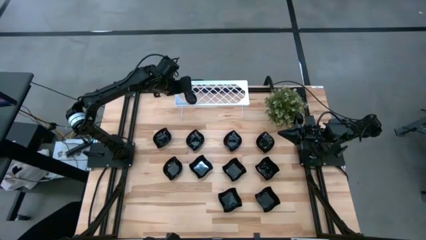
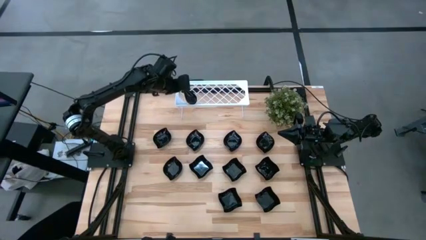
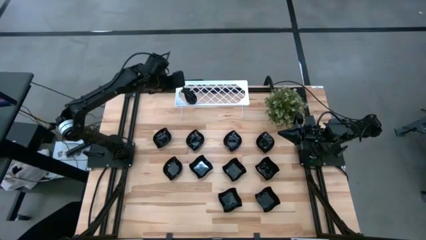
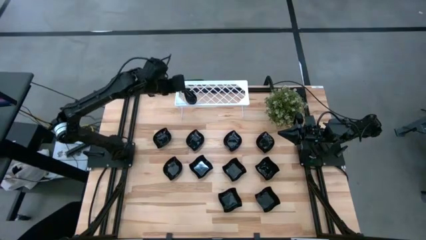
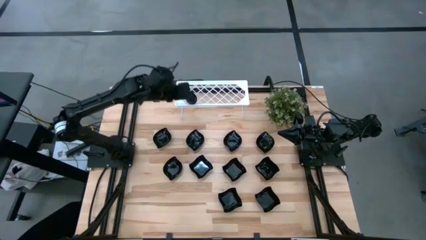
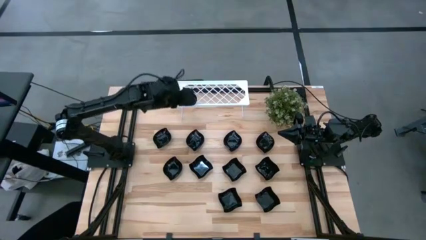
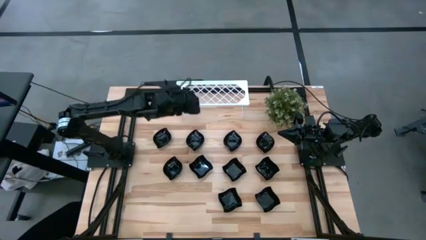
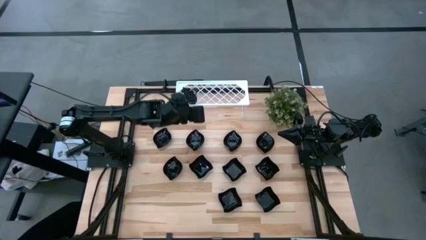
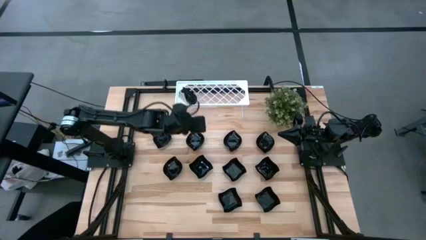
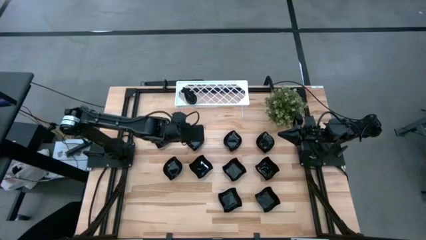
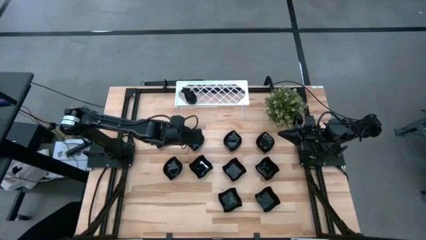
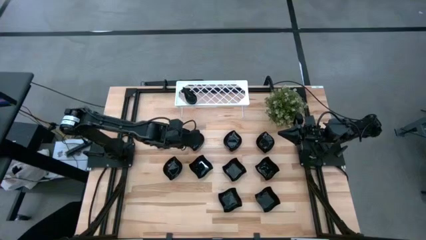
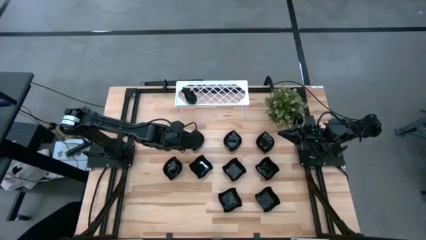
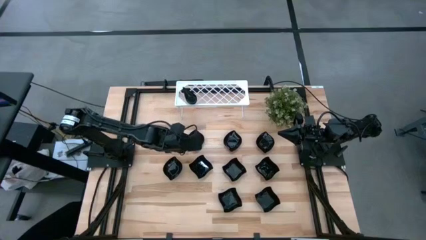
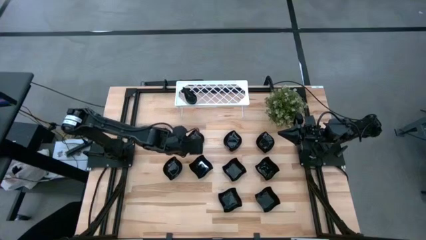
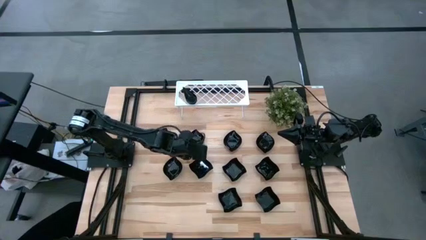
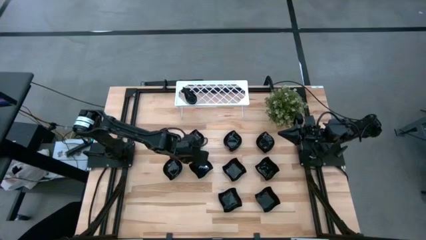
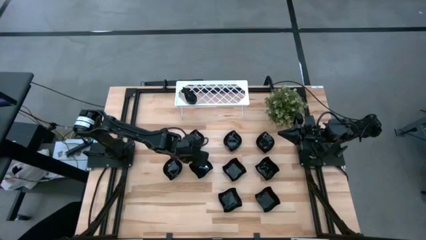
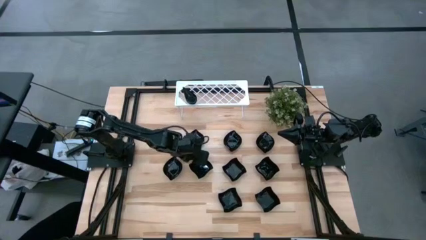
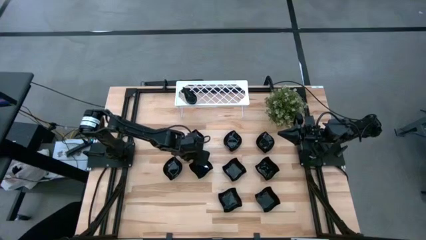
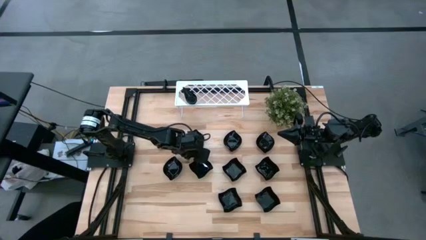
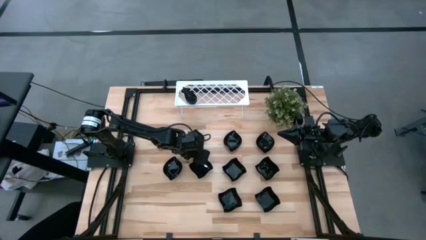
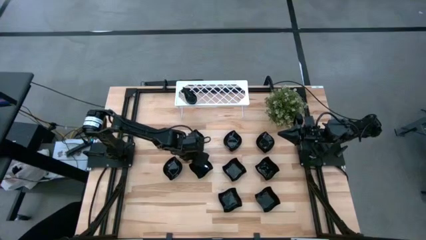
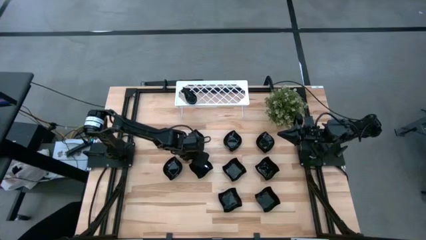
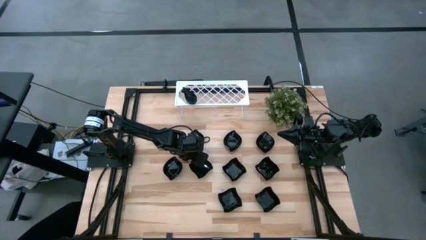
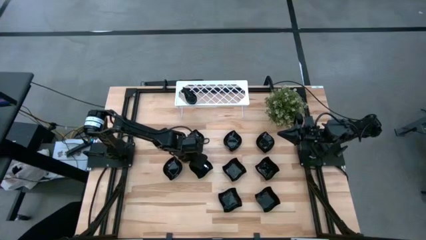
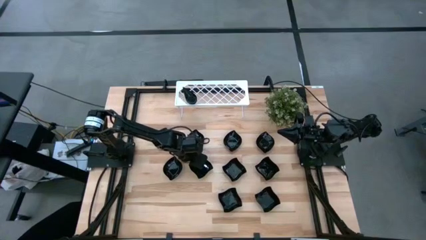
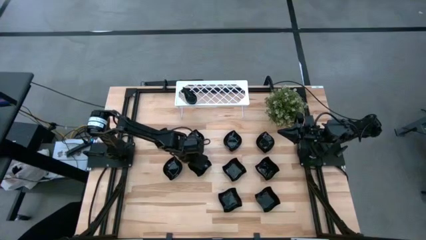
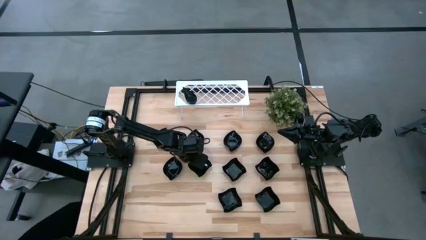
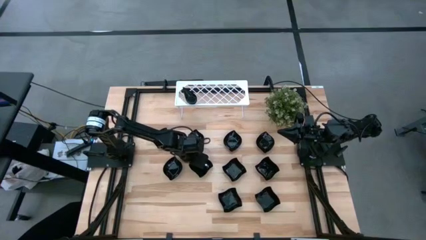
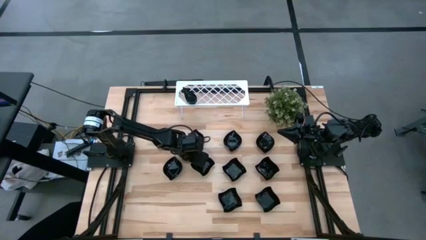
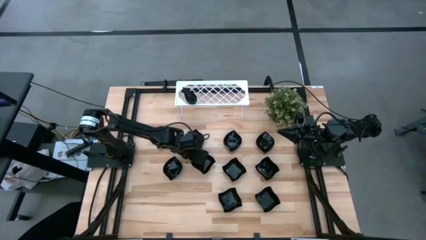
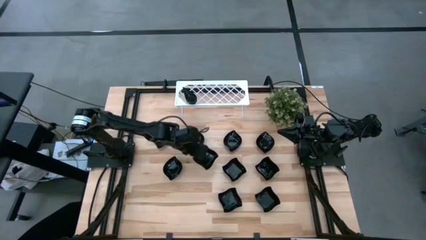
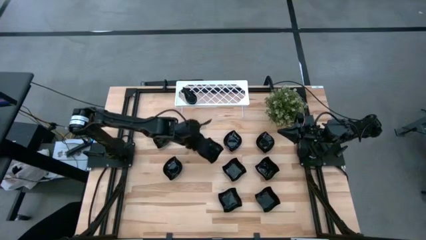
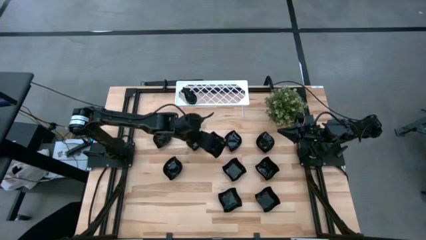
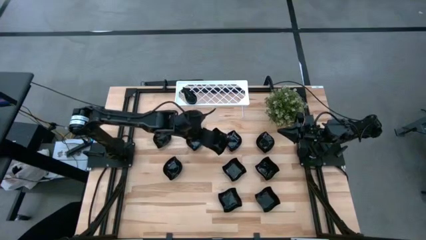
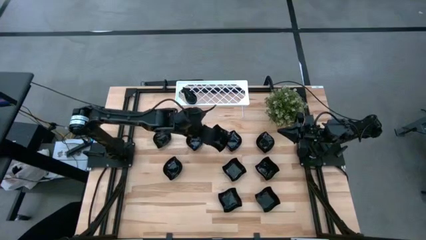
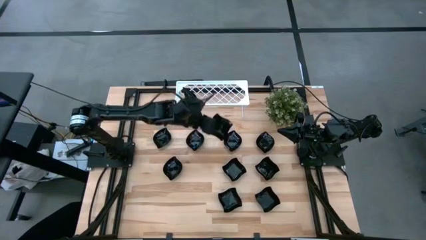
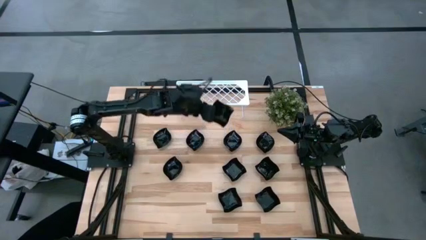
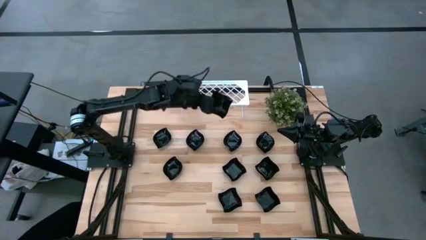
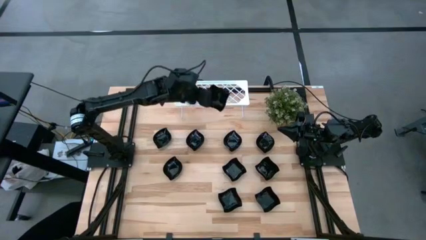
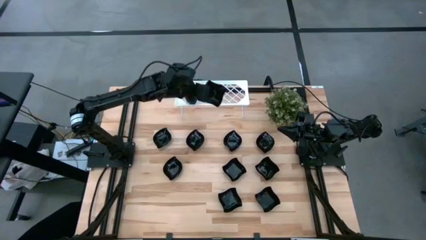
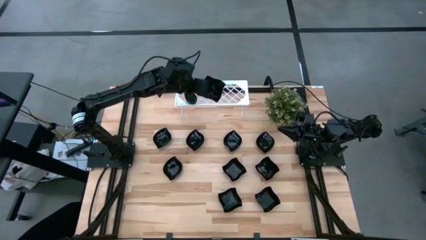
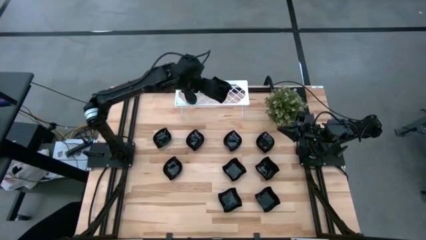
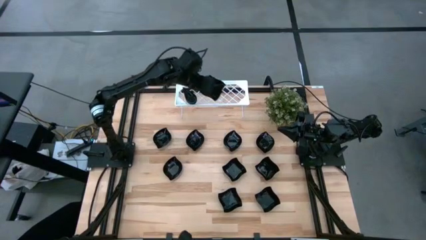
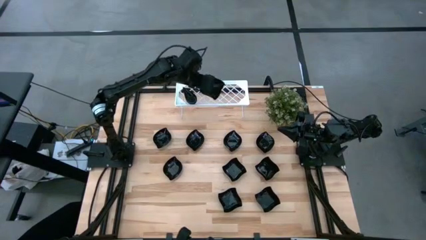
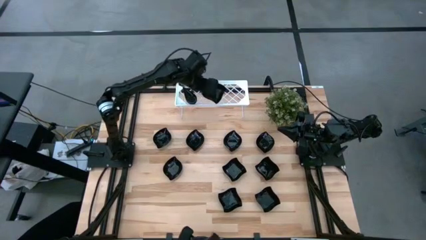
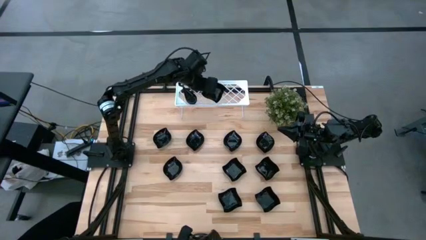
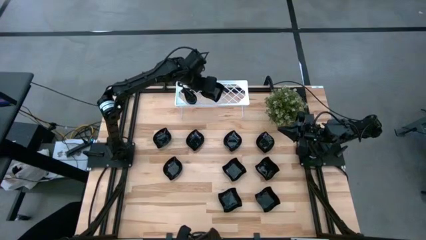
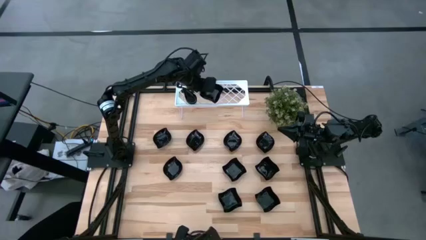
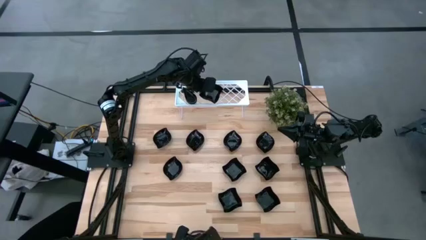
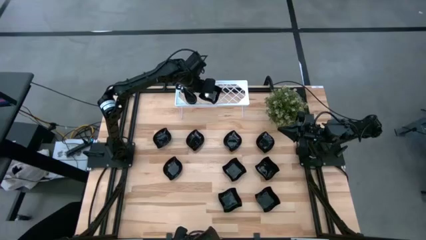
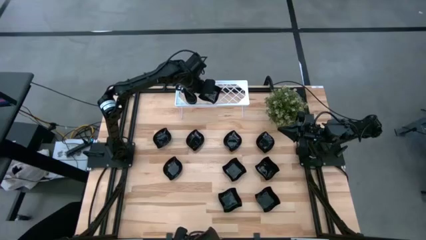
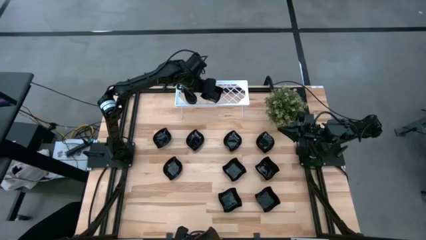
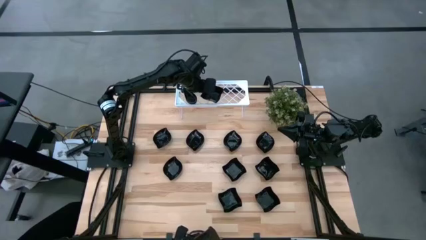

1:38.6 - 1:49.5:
Task: Pick & Place Mini shaped plates
Put the black distorted square plate on the shelf

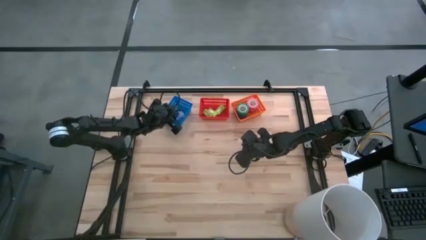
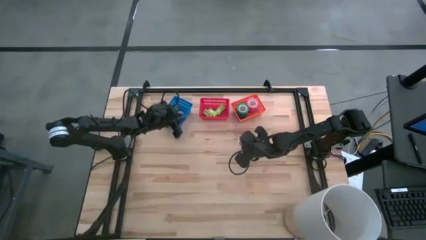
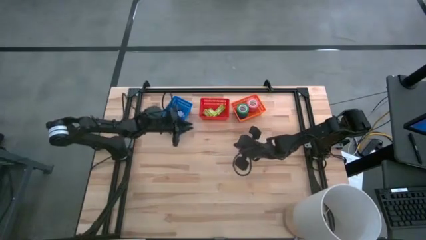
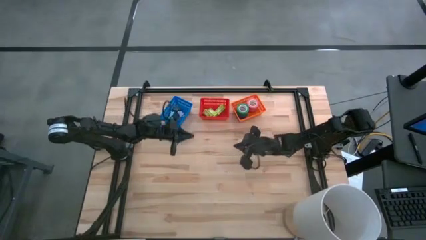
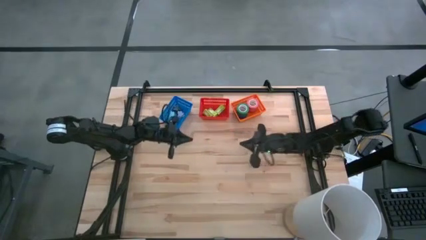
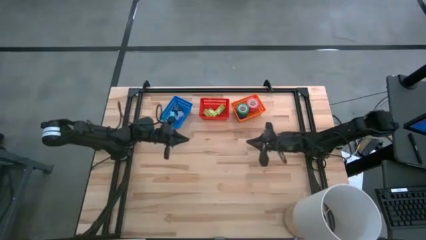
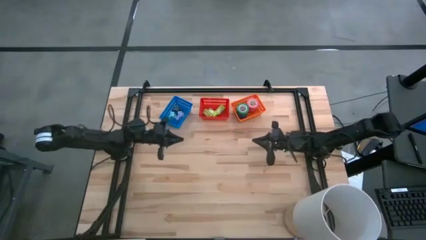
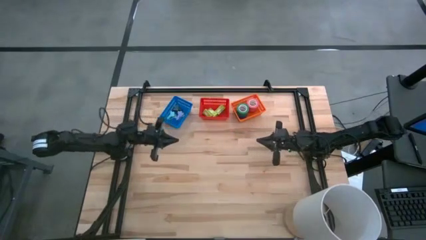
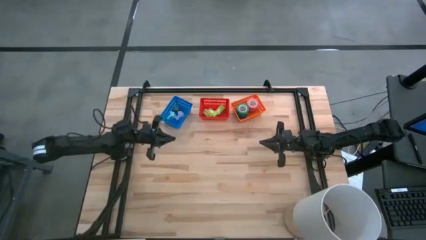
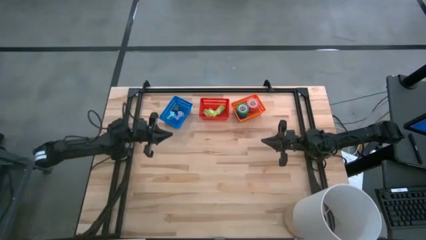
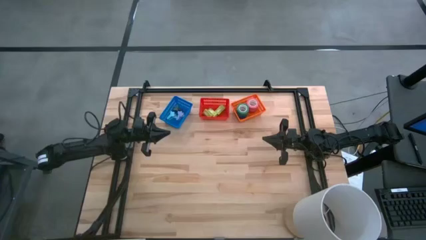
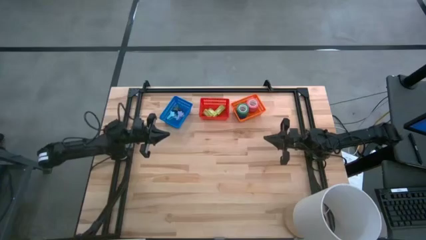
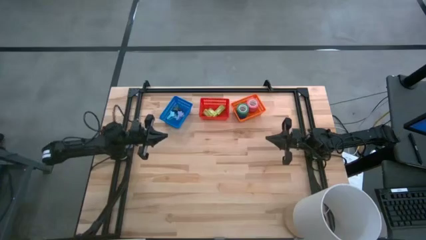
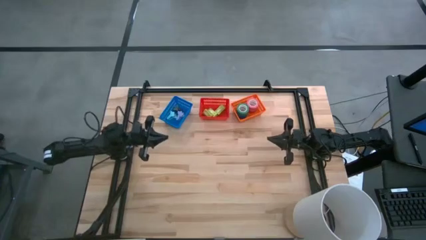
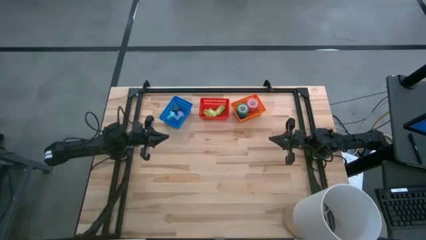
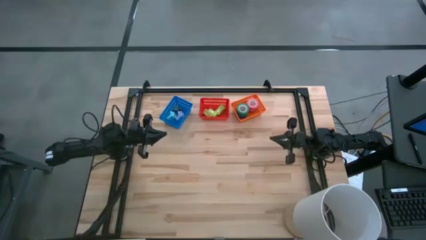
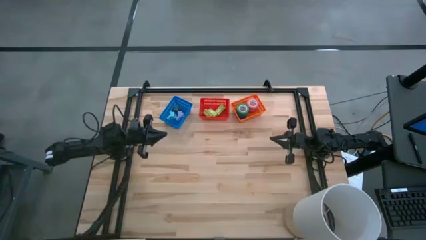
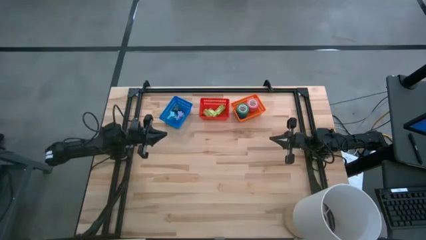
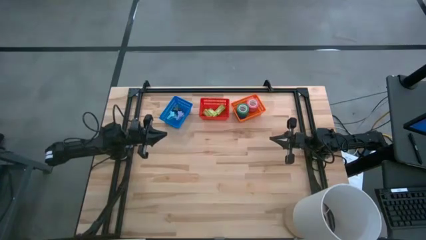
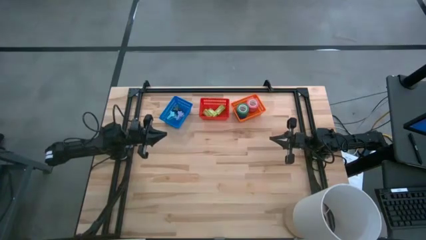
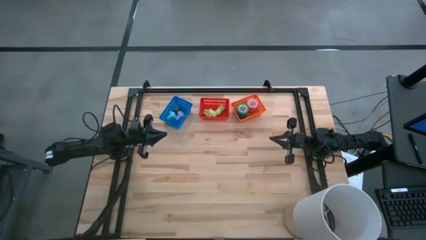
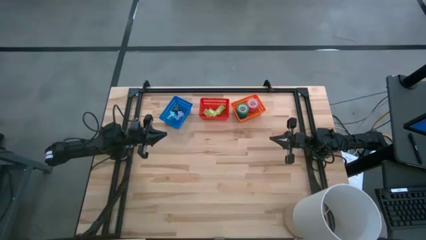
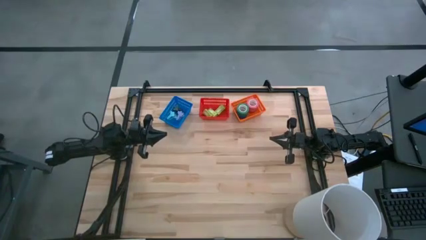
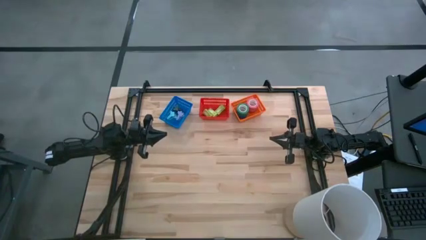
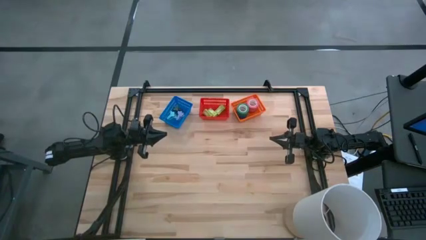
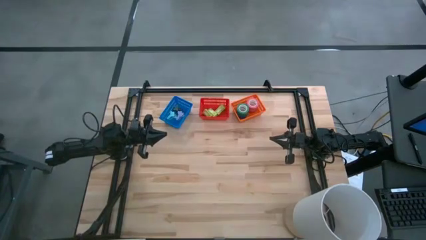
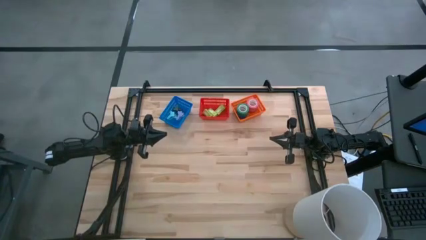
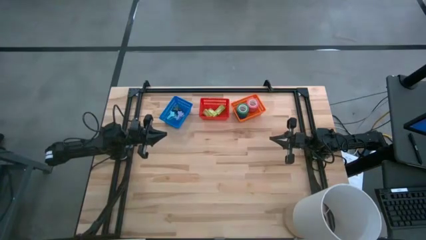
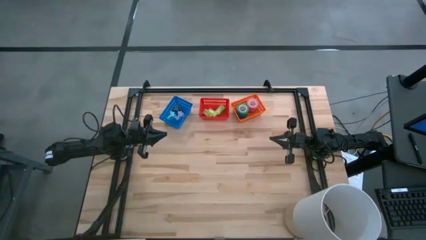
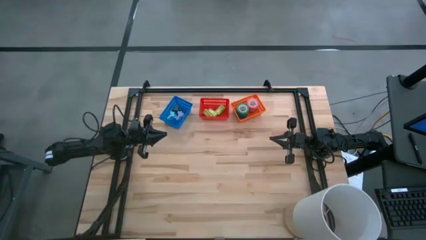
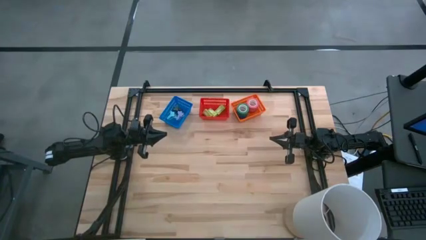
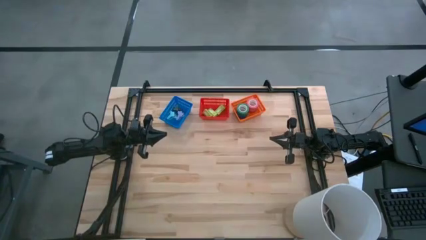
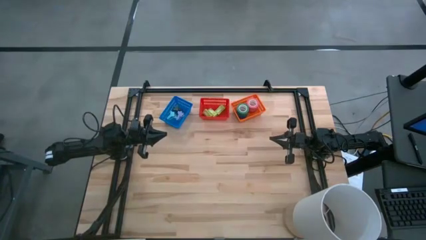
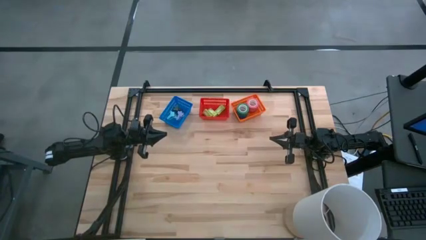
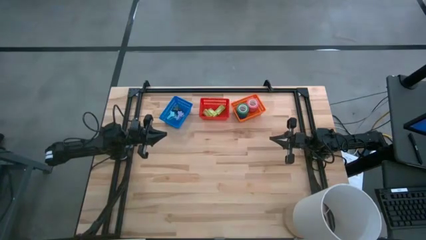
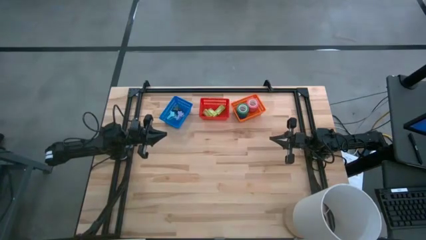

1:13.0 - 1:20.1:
Task: Pick and place Stapler, Stapler remover, tape
Return to Home Position
